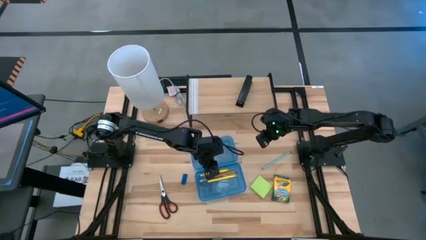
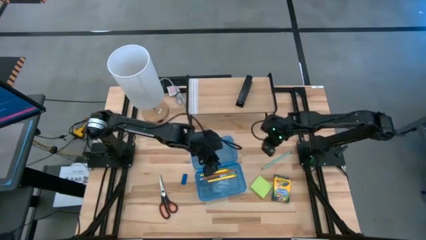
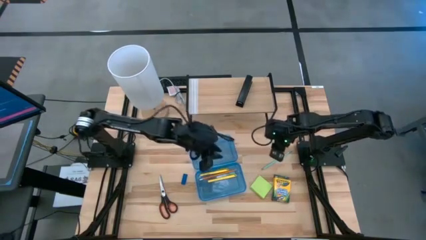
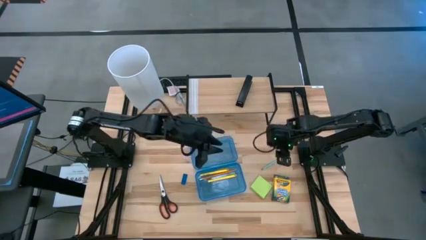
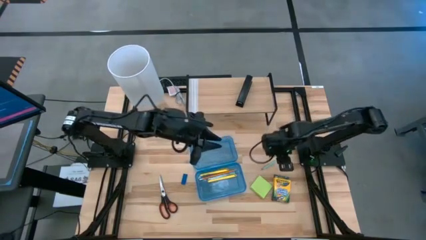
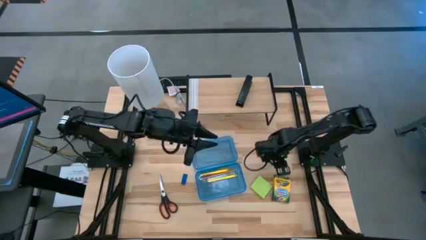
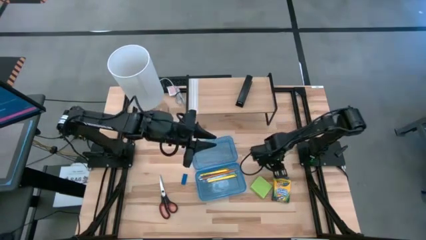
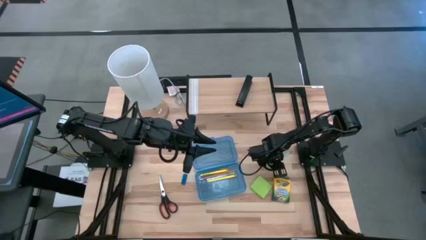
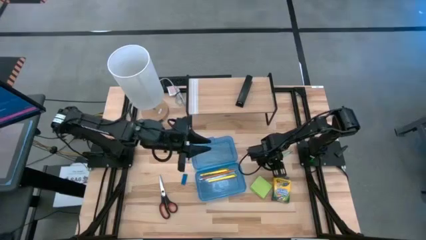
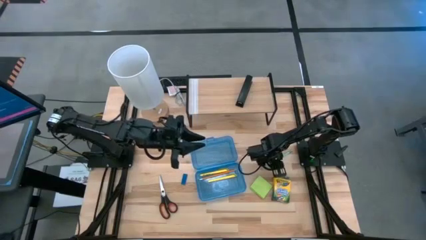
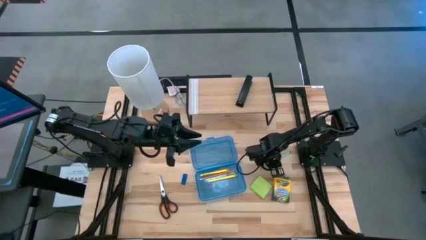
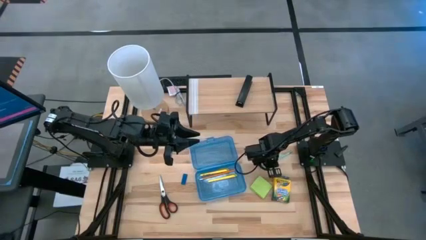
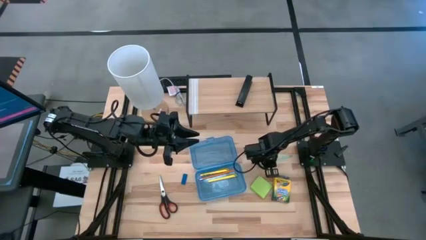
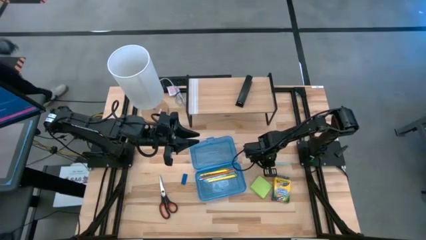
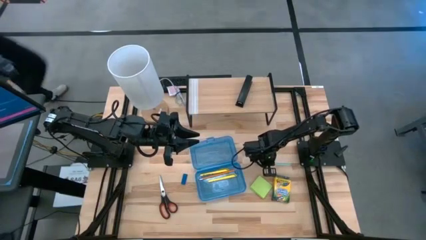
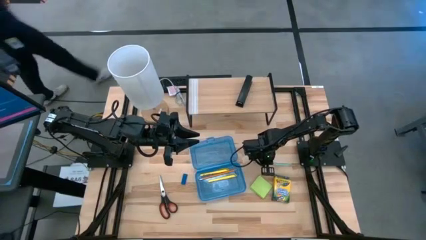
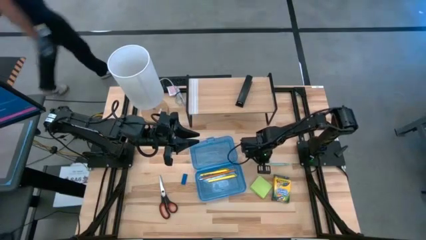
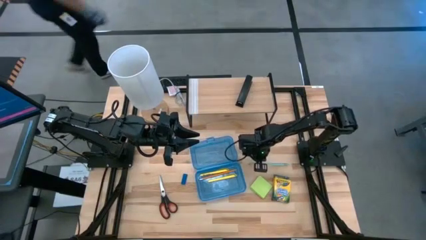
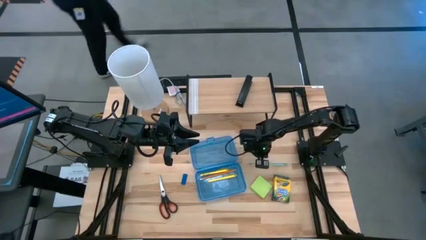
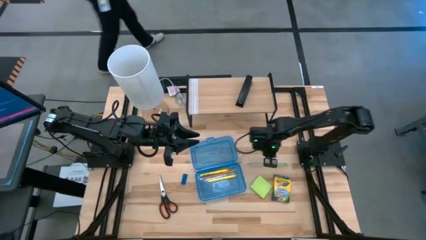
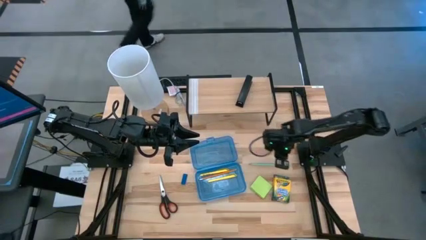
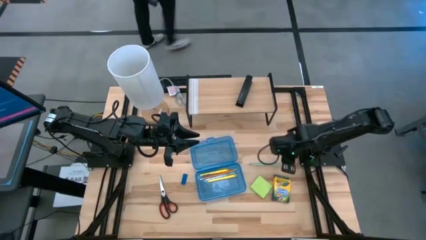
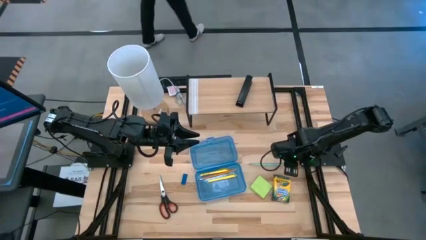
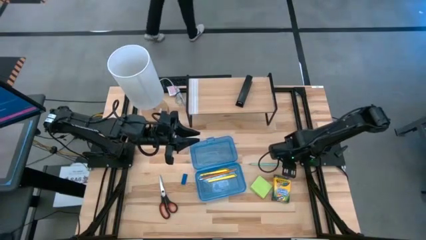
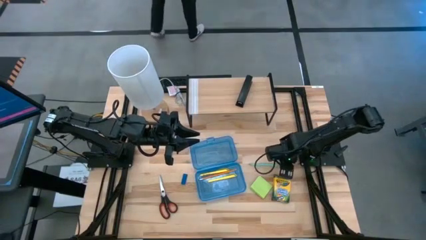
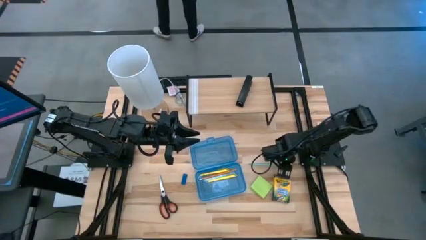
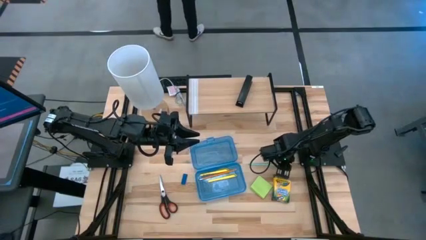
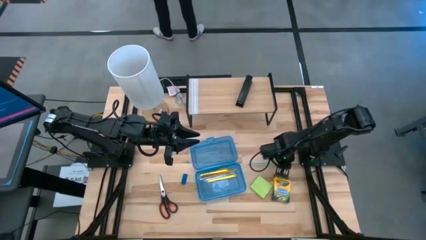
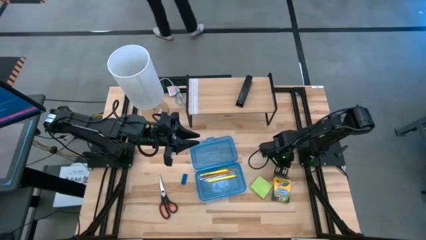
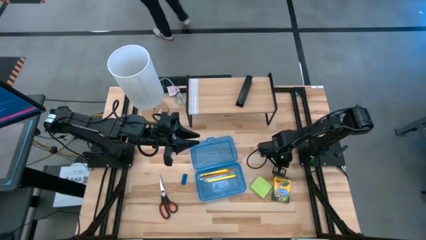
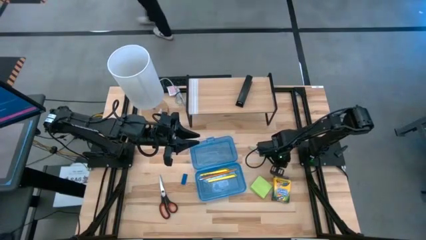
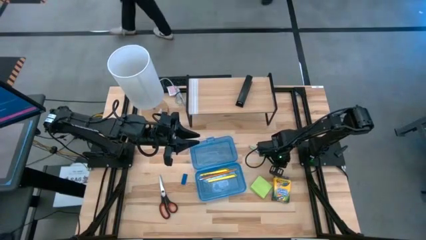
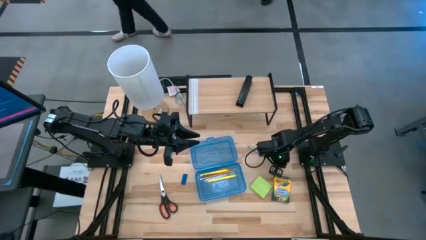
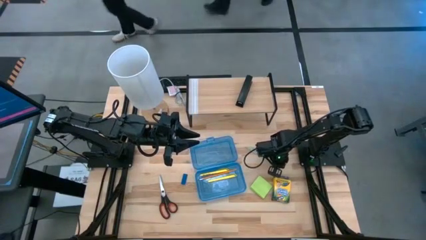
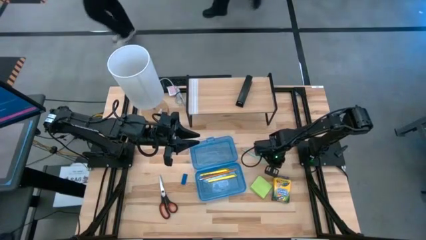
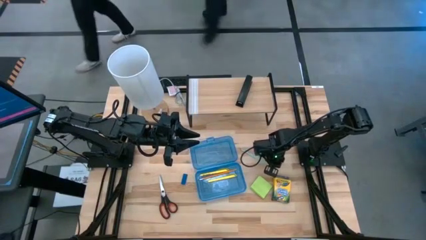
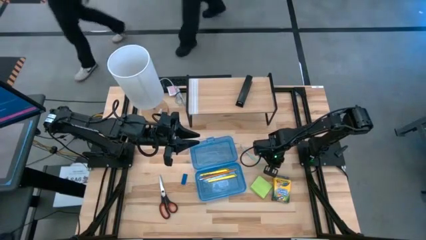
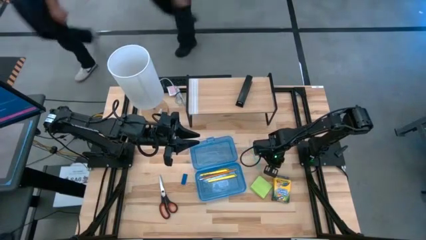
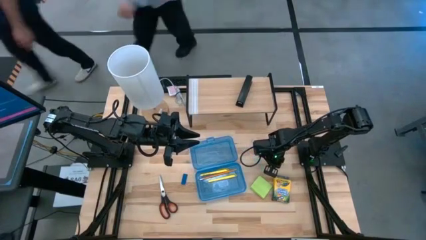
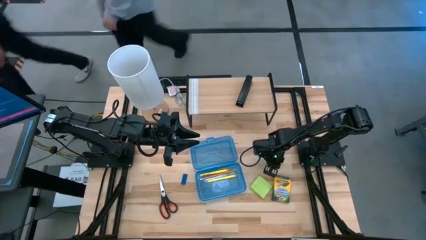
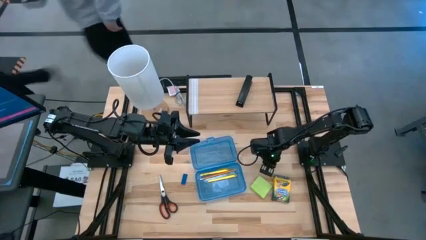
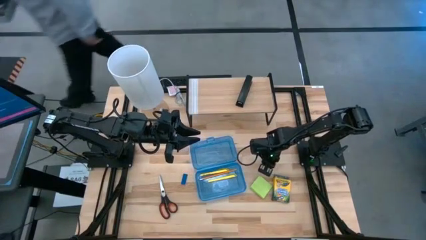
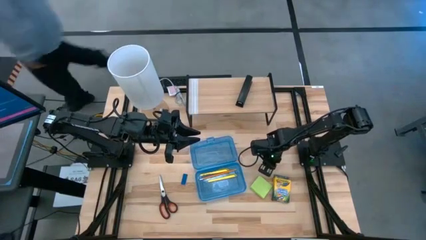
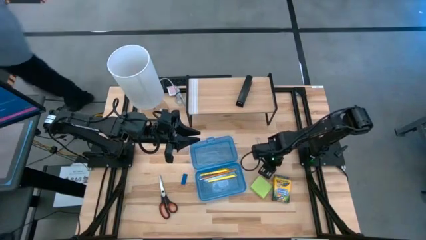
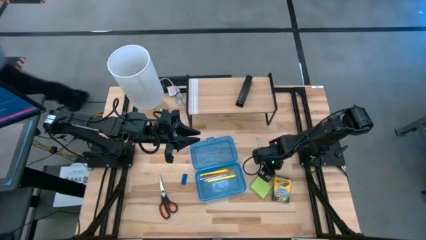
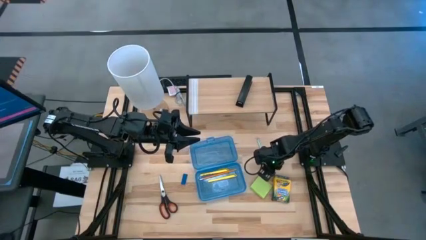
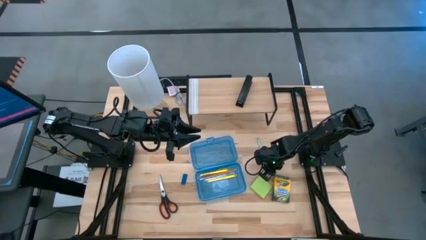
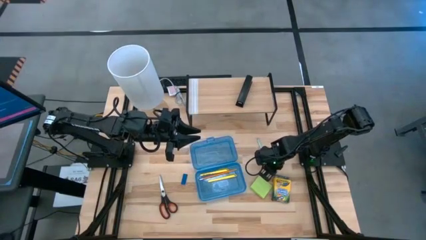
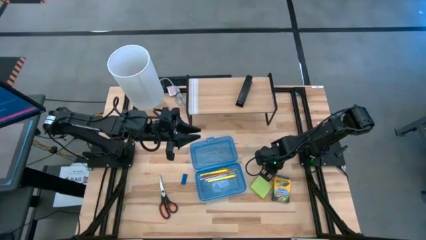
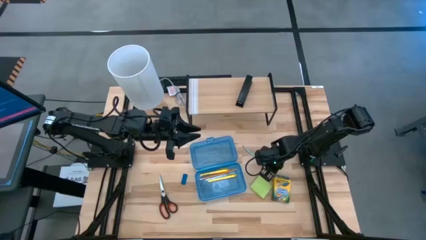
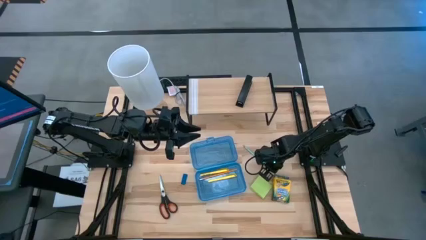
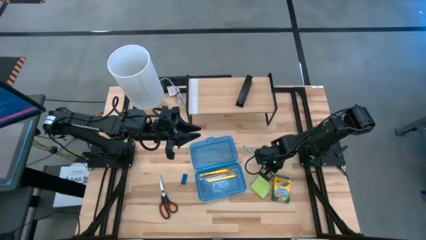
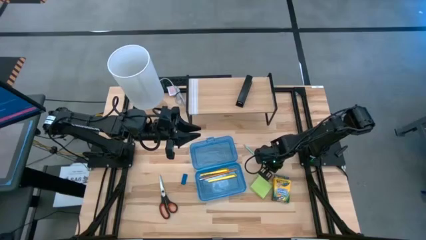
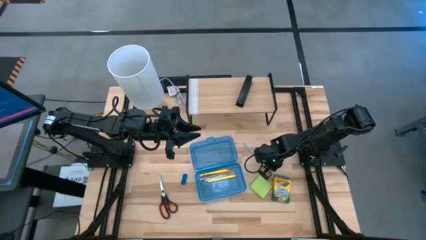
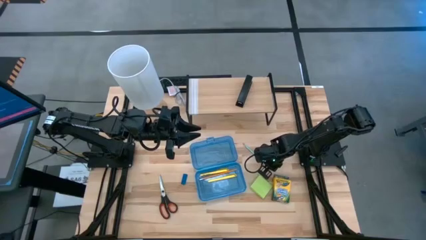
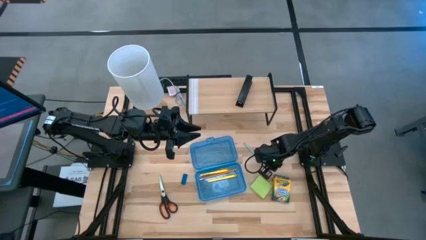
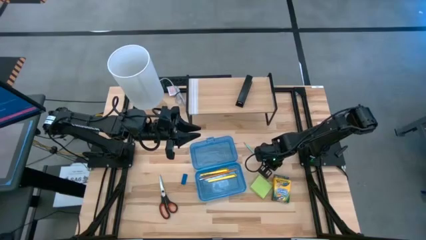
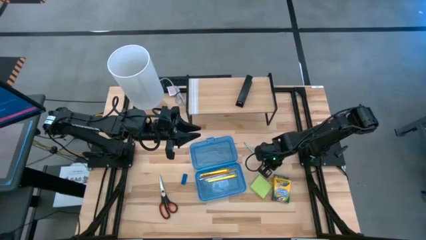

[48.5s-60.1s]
Task: Pack school essentials
Put the blue pencil into the blue supply box

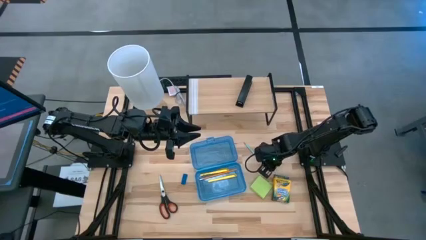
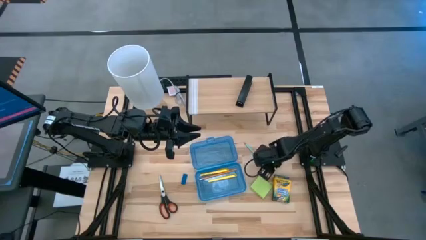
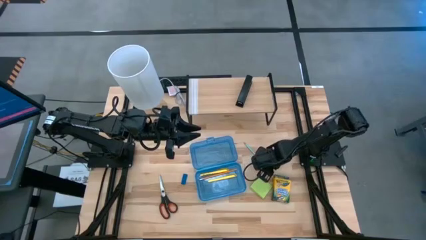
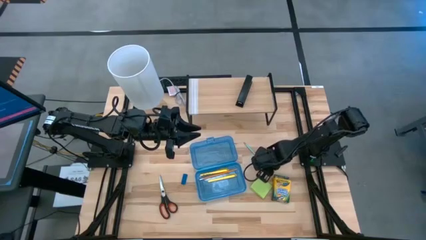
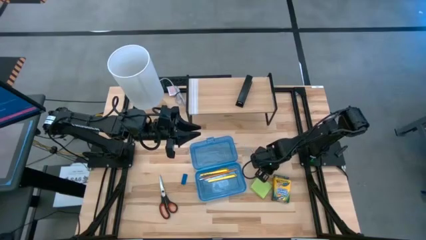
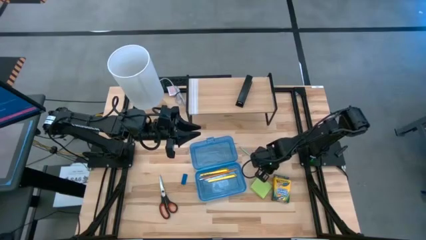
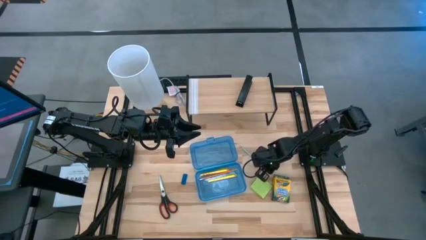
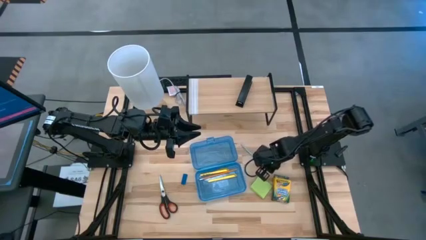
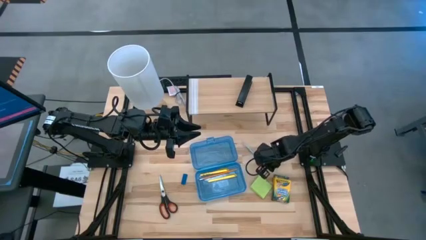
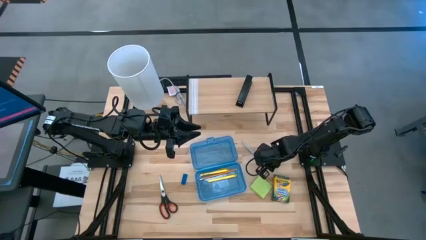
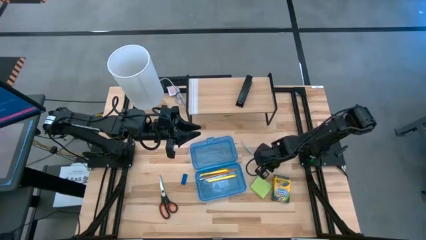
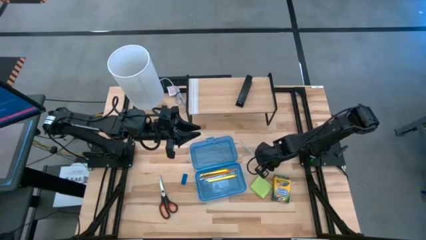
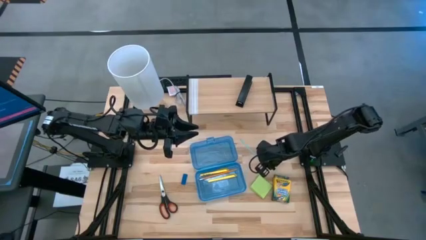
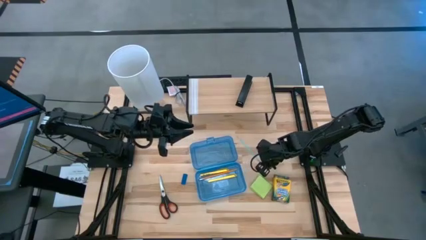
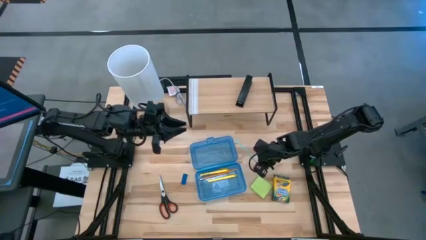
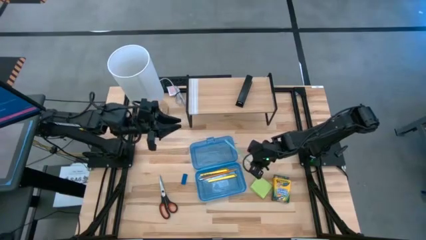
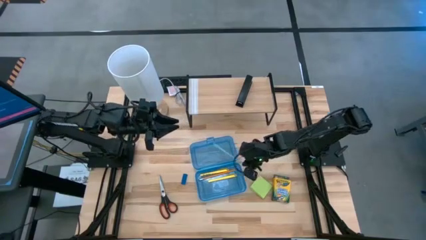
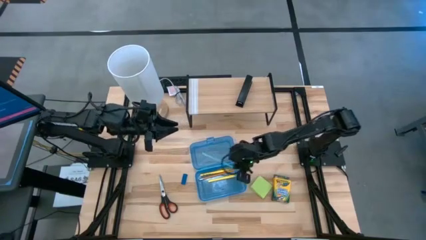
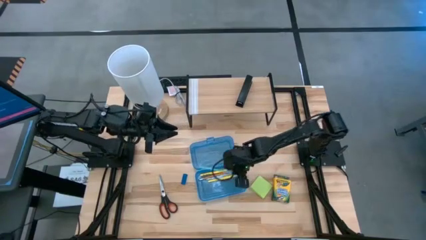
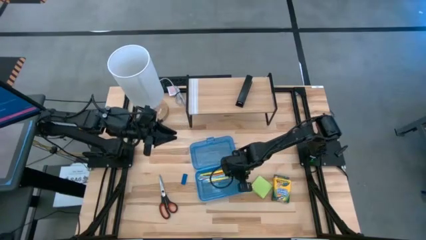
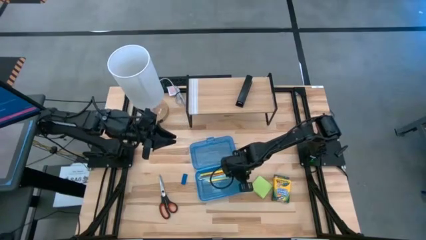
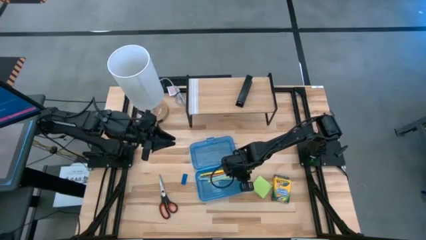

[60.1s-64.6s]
Put the blue pencil into the blue supply box
